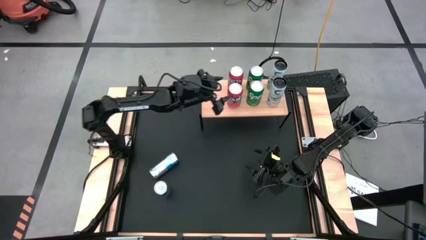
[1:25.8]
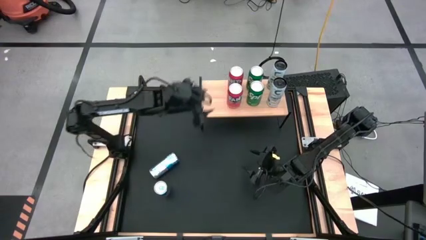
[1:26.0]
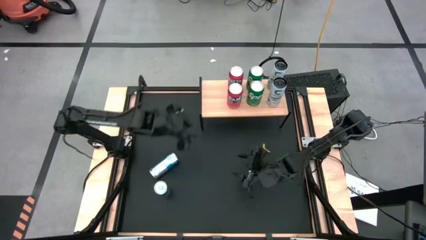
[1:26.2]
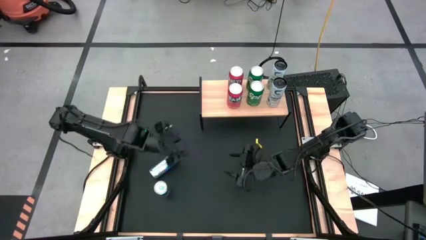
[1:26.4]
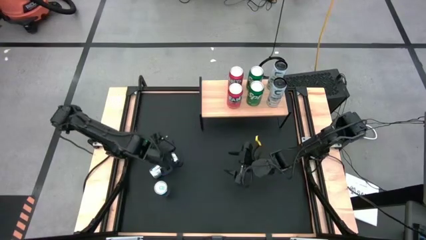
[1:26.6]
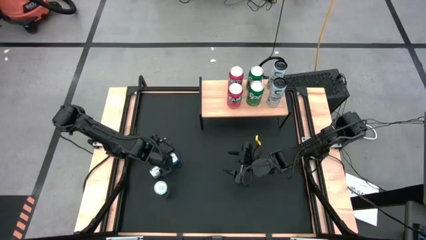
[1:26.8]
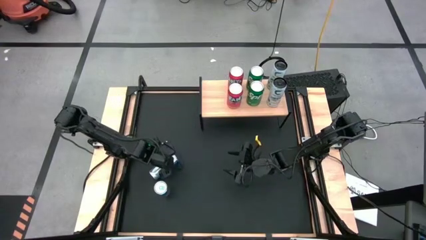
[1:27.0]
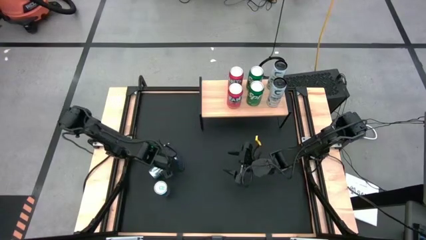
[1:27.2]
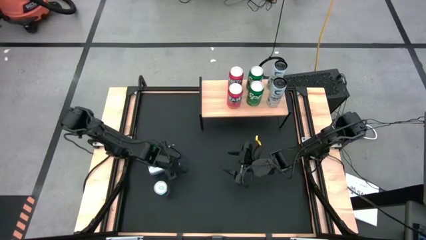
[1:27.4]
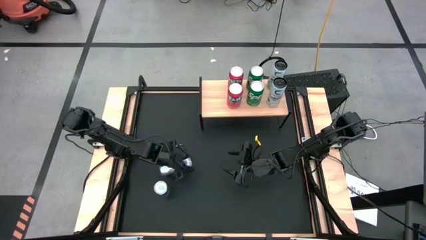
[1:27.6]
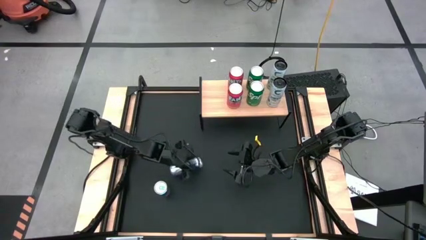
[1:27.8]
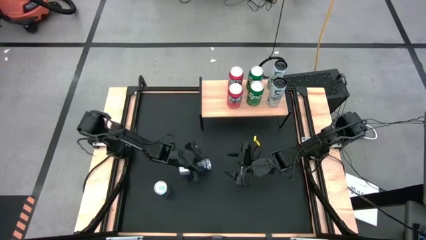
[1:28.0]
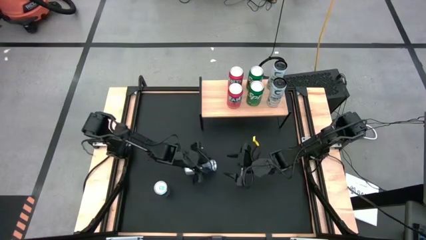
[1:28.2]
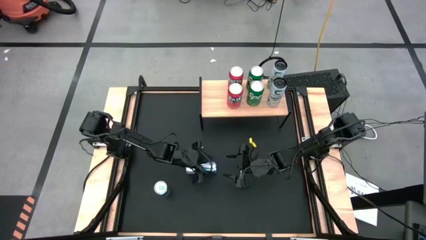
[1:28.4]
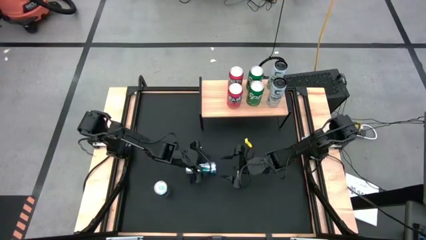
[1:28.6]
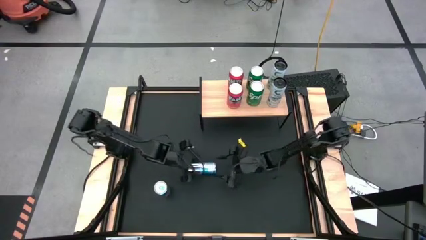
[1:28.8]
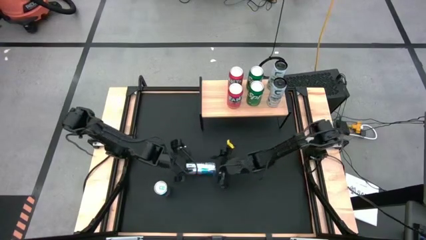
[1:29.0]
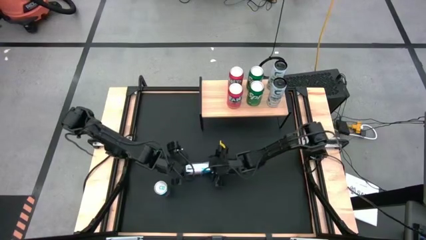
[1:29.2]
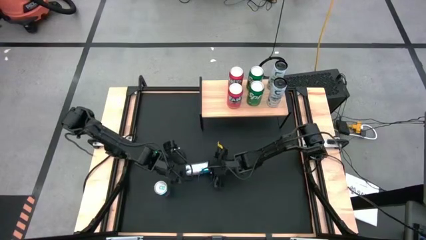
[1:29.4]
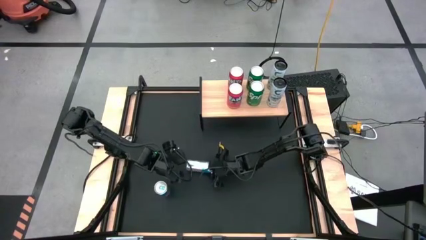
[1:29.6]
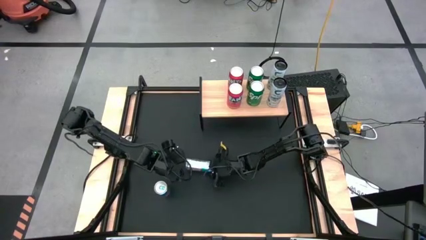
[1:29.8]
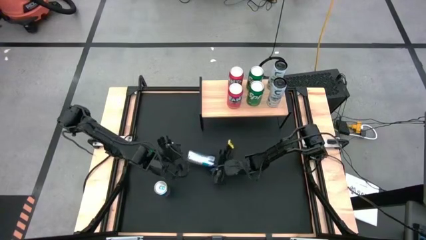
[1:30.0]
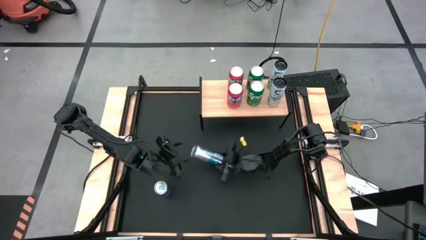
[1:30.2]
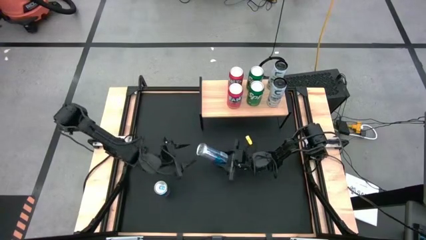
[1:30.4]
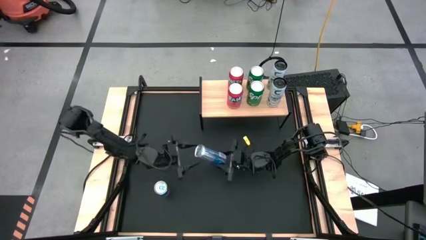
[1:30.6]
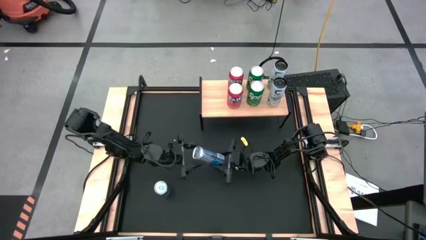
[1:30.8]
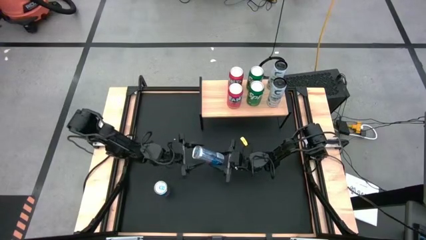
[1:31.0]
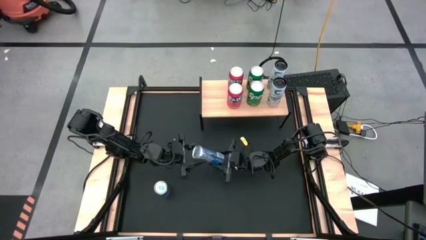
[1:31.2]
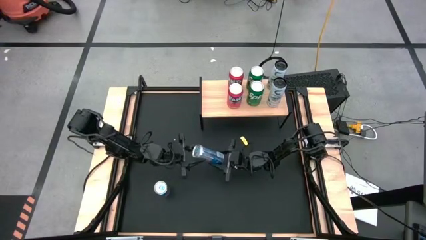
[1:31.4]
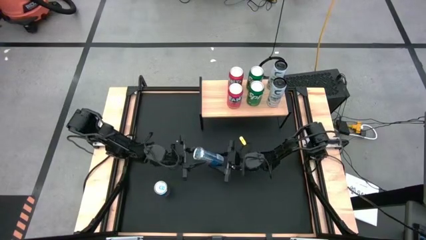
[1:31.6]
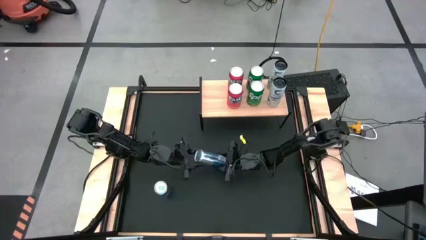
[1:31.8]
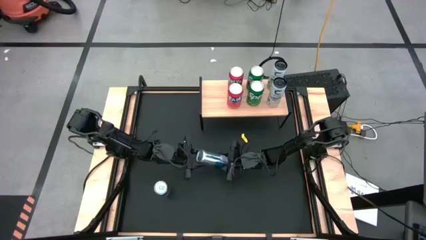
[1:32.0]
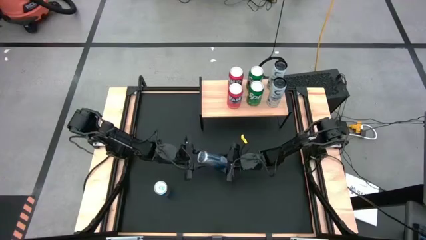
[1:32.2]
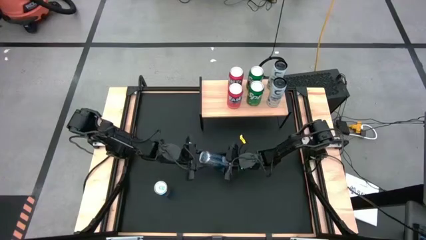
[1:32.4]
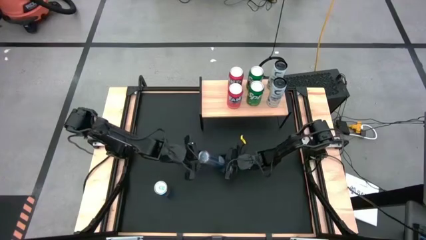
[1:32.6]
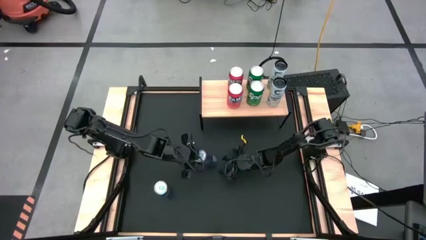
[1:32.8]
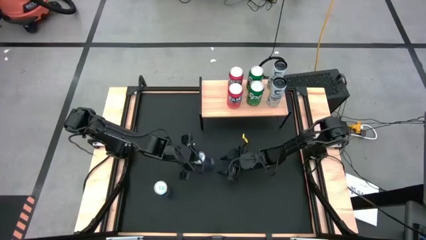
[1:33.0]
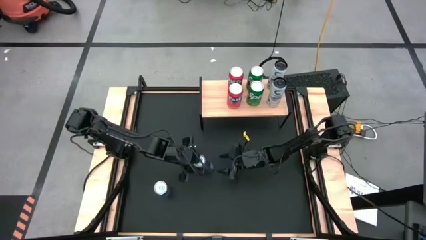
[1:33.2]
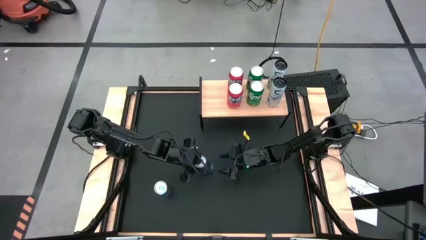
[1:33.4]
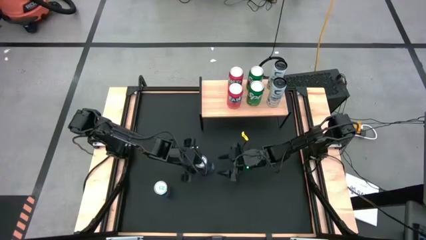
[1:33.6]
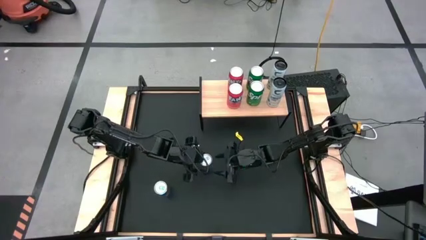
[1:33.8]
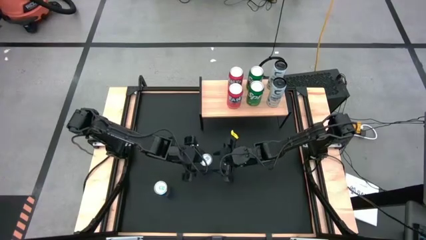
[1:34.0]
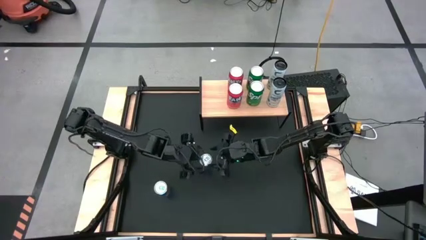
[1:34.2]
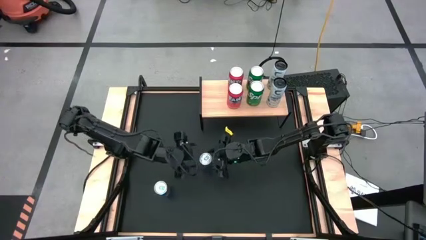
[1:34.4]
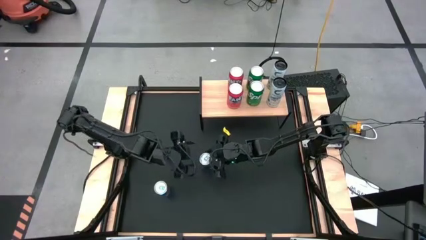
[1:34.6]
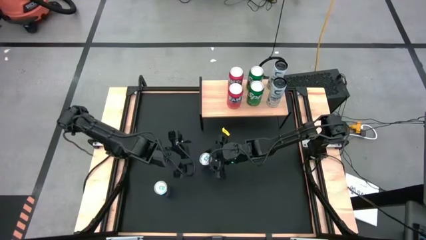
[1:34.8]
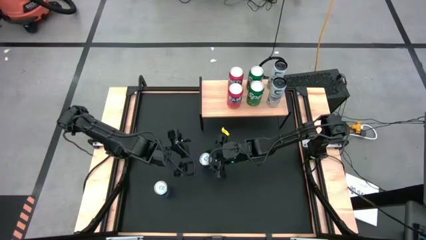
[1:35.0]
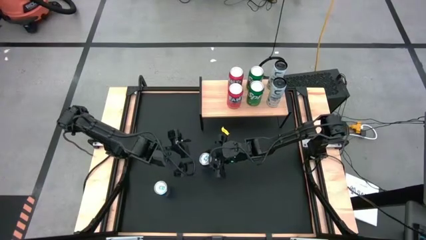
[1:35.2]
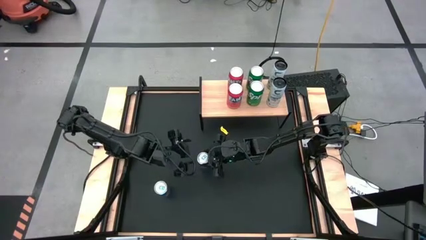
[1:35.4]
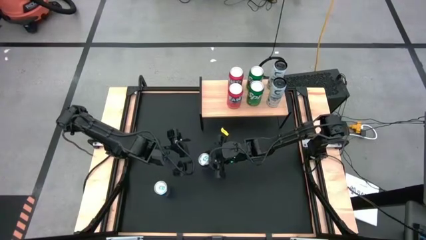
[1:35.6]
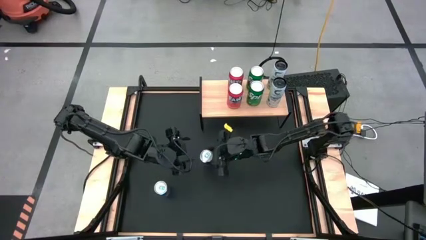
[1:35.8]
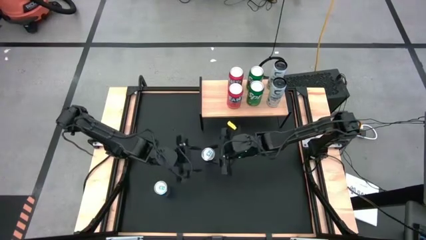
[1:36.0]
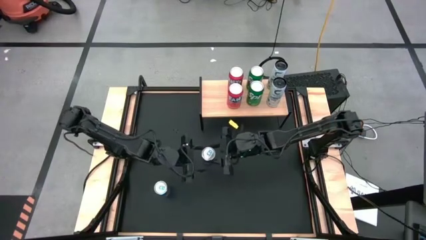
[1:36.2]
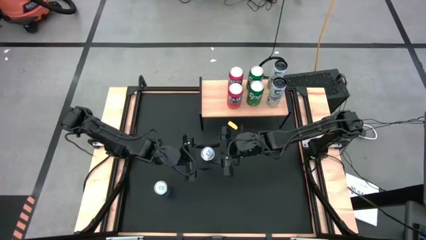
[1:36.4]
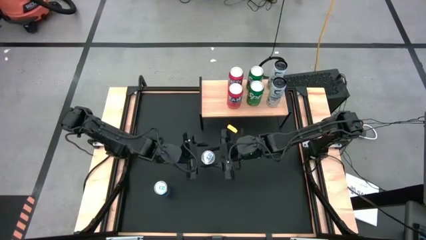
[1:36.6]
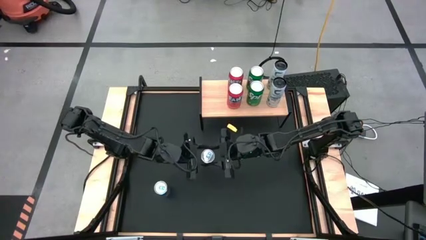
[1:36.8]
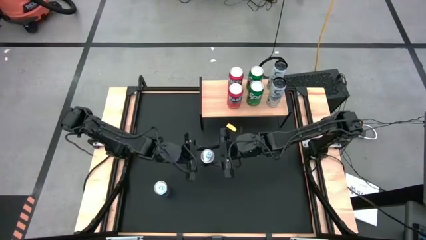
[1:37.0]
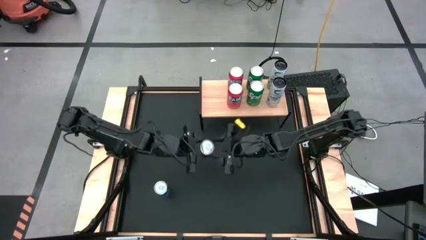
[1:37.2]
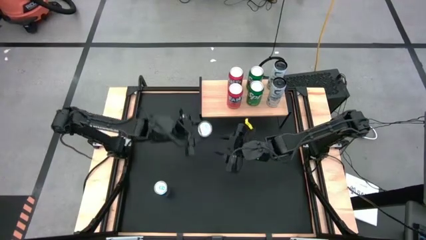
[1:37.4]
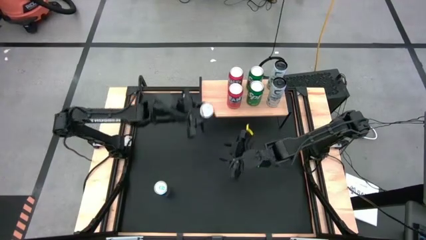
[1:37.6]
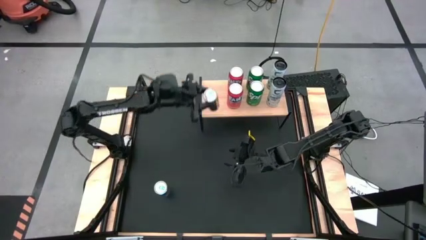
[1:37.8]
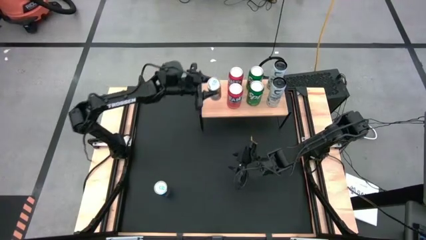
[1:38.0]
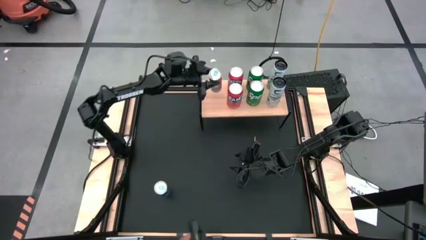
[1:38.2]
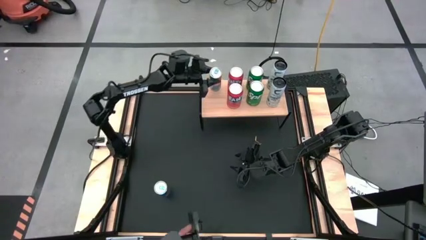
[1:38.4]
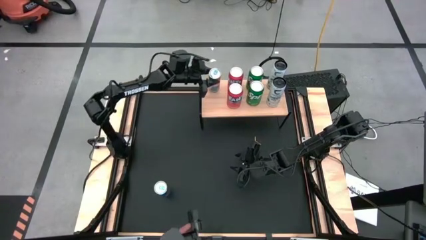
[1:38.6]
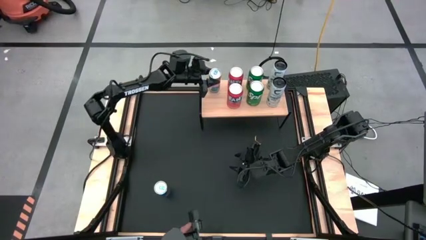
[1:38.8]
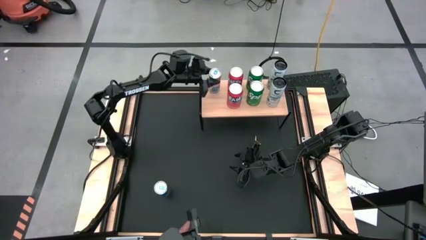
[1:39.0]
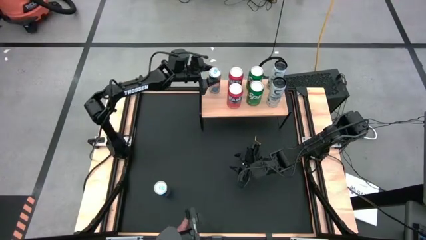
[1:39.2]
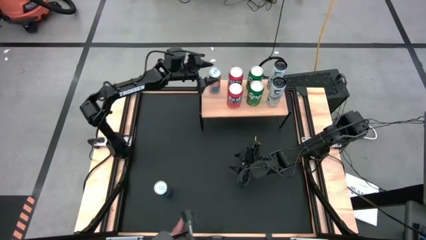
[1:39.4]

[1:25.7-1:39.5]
Task: Place canned beverage on shelf
Put the top blue soda can on the shelf

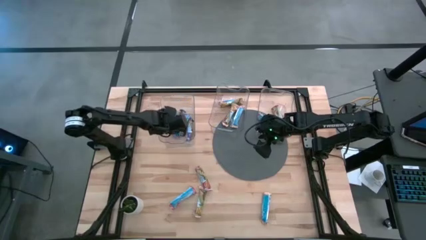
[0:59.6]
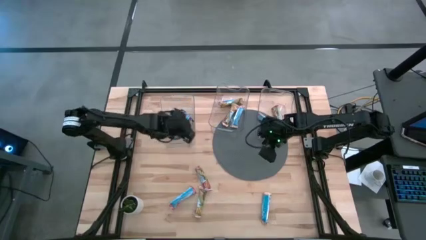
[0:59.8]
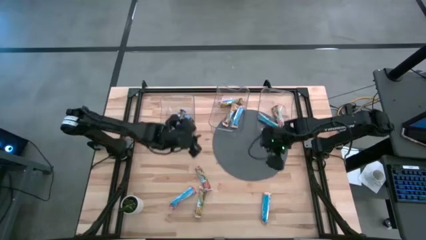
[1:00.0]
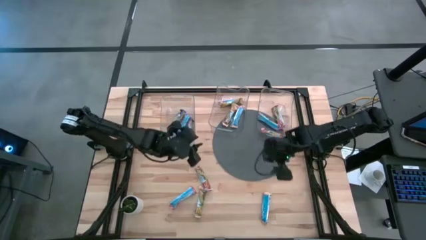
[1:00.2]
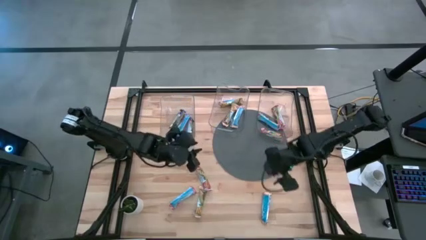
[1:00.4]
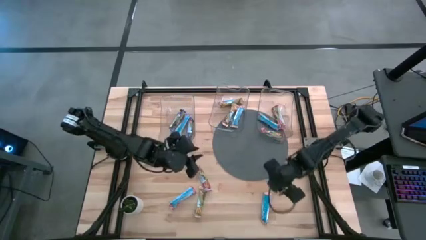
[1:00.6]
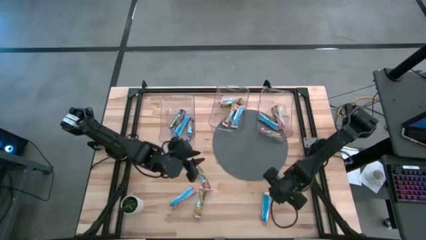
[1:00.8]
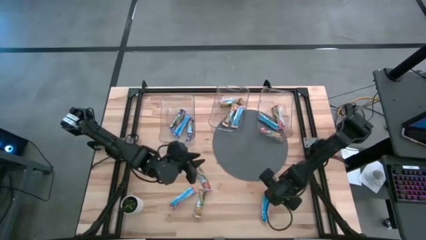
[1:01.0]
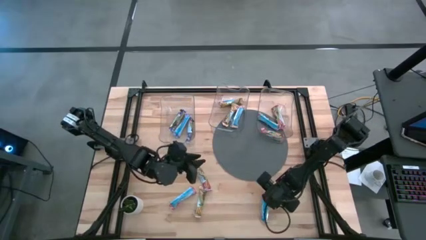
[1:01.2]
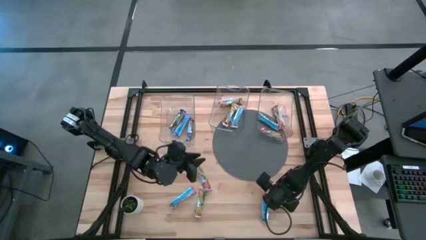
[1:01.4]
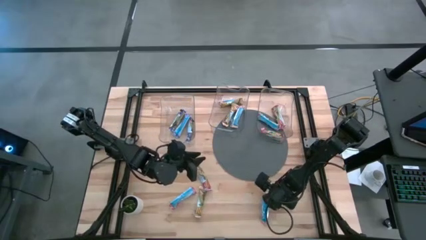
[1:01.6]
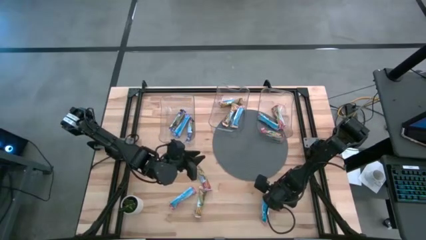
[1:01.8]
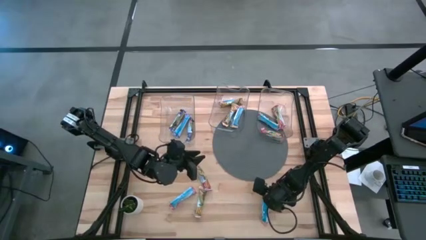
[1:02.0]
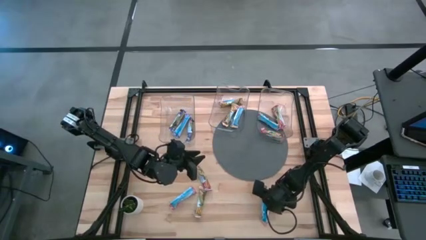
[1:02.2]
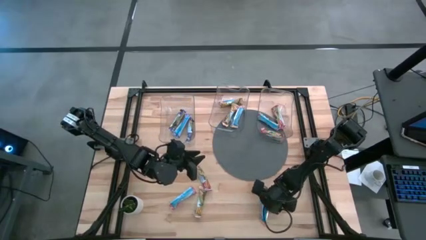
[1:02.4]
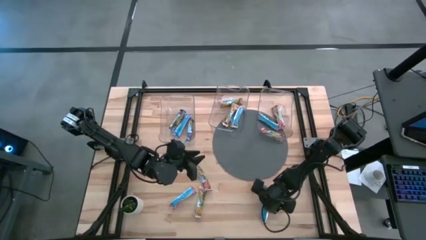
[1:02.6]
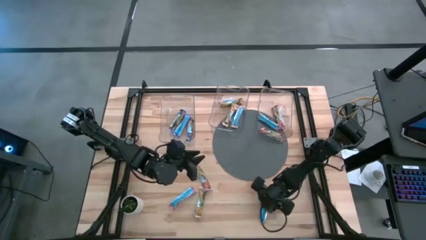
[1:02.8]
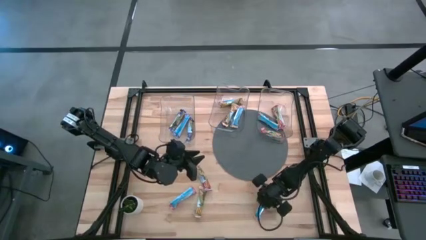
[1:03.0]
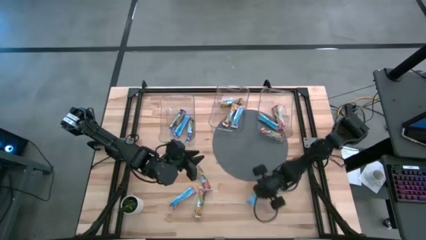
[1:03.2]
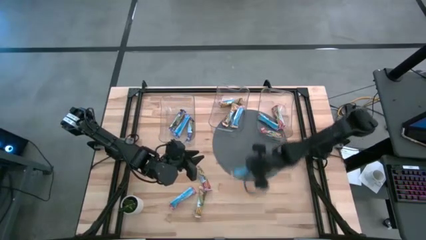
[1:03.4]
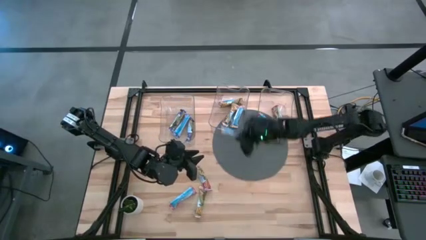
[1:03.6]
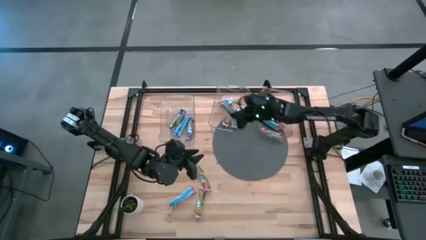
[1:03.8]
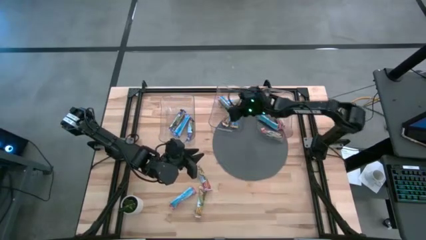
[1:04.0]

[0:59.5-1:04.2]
Task: Pick and place Granola Bars by type
Put the yellow granola bar into the middle transparent bin
